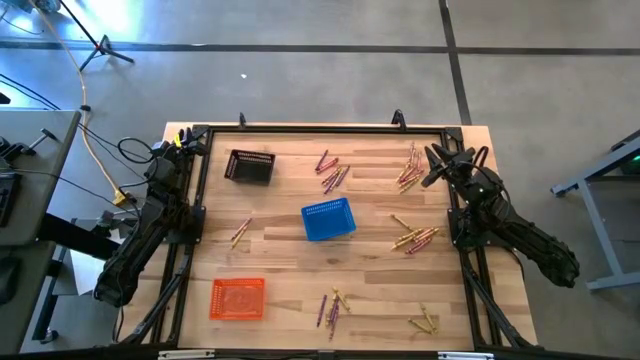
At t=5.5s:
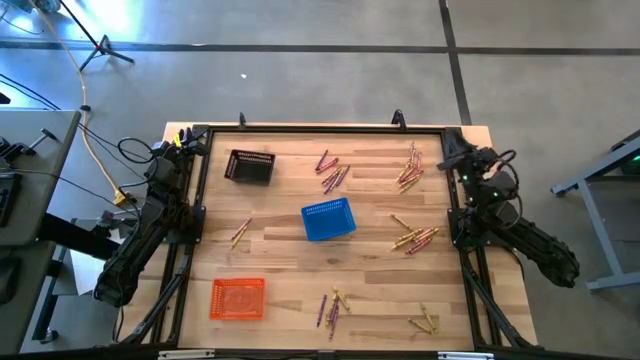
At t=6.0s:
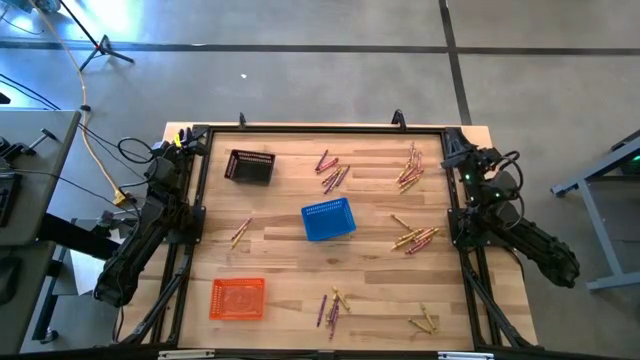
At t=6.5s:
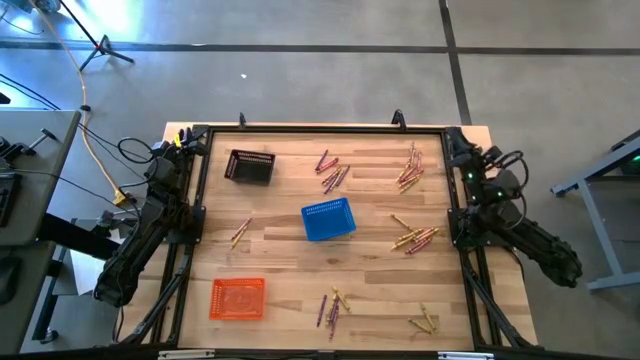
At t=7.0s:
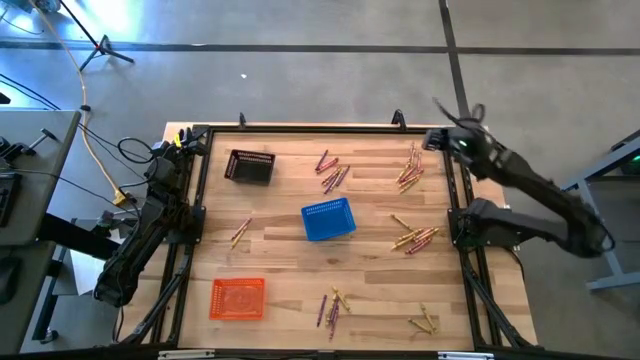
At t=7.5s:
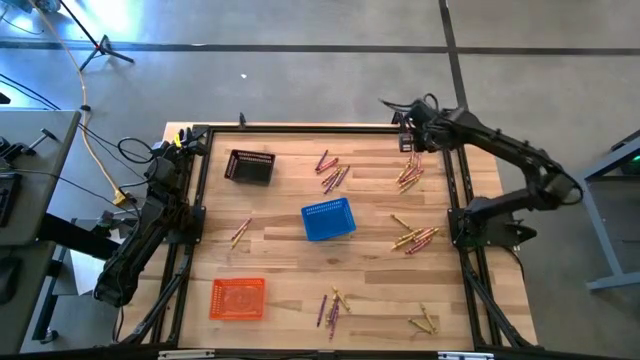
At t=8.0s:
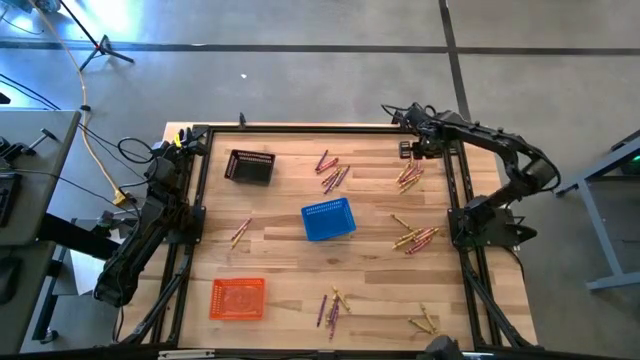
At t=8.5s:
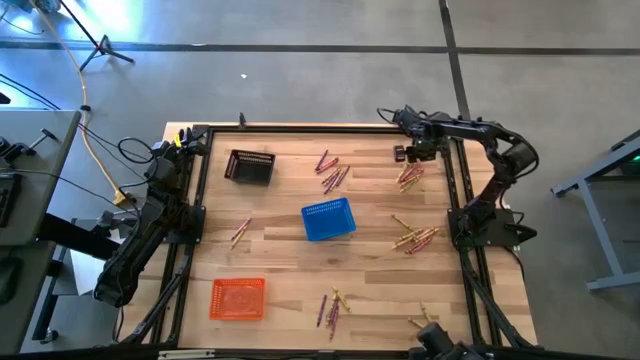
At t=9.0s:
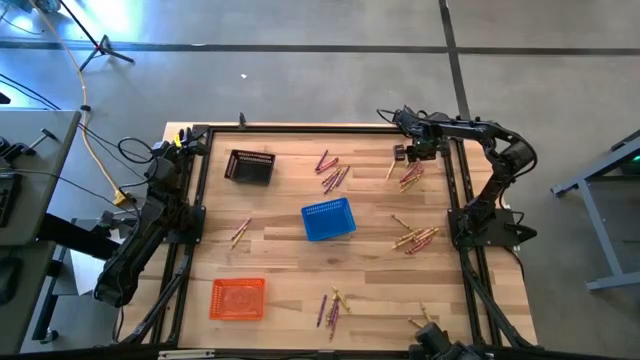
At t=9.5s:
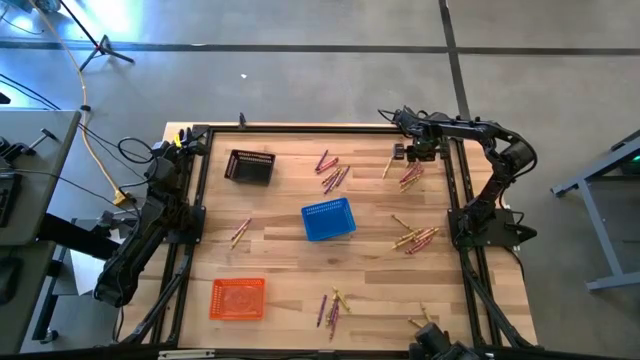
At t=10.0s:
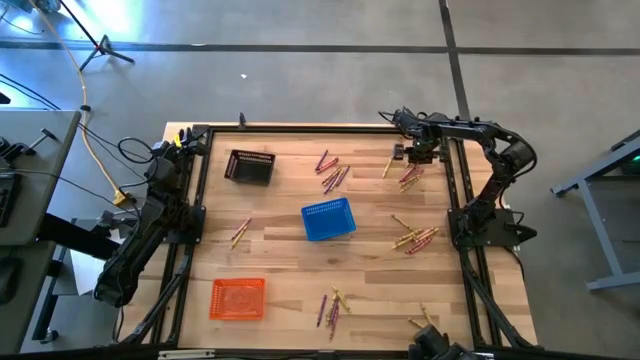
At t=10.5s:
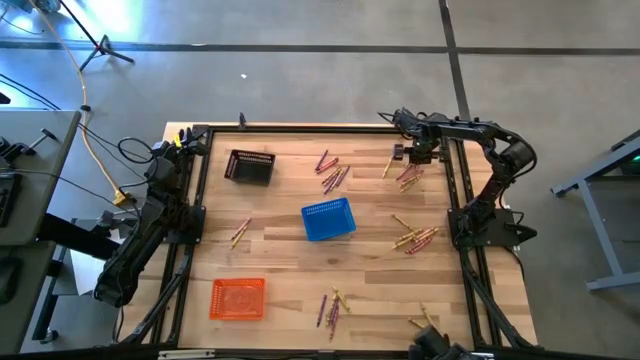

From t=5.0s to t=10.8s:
Task: Sort crayons
Put the red crayon into the black basket

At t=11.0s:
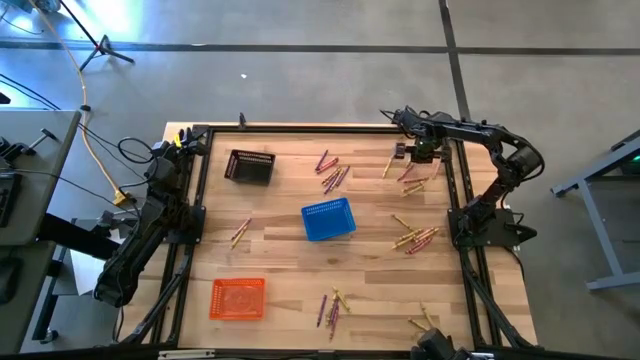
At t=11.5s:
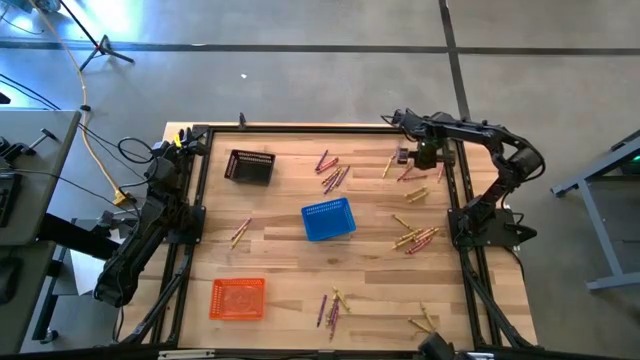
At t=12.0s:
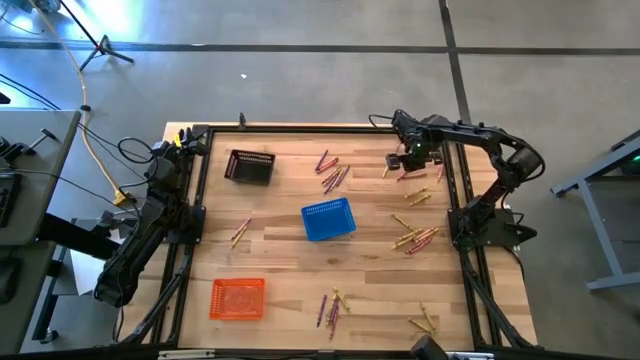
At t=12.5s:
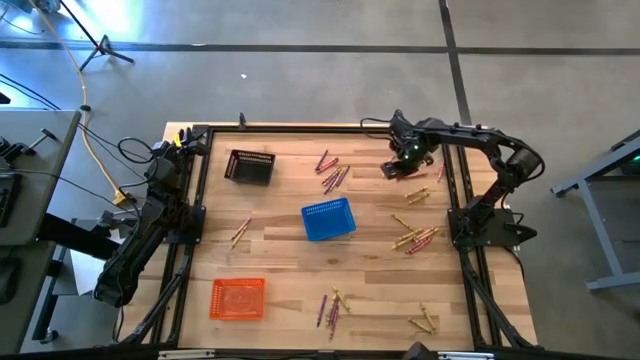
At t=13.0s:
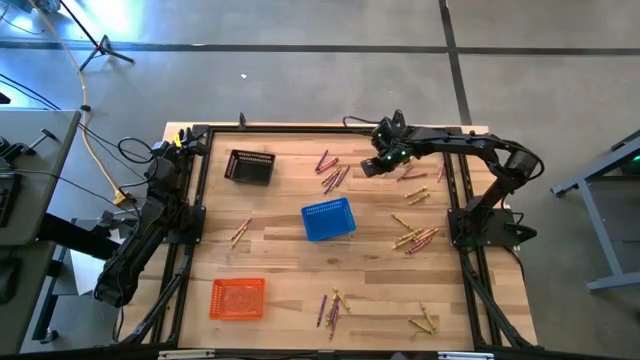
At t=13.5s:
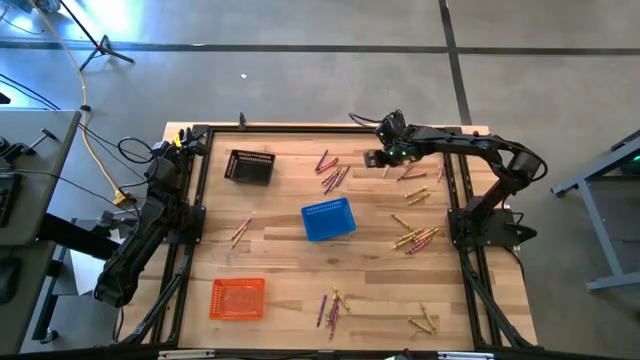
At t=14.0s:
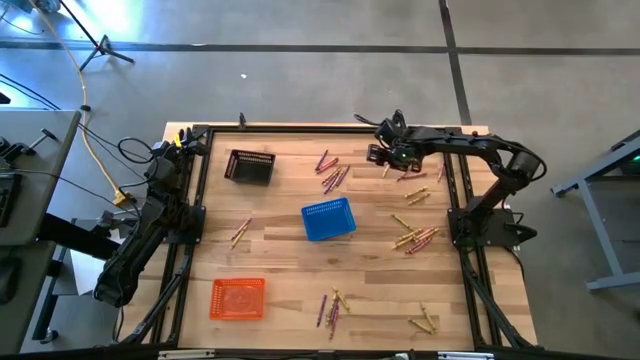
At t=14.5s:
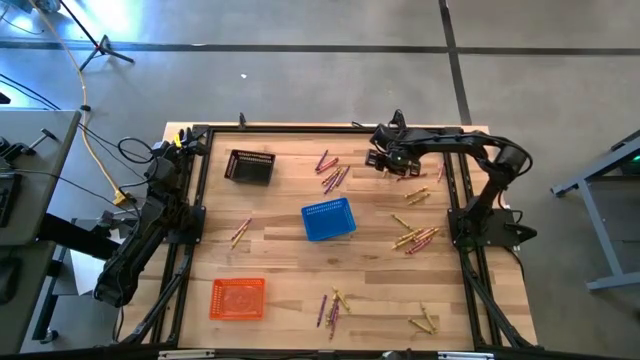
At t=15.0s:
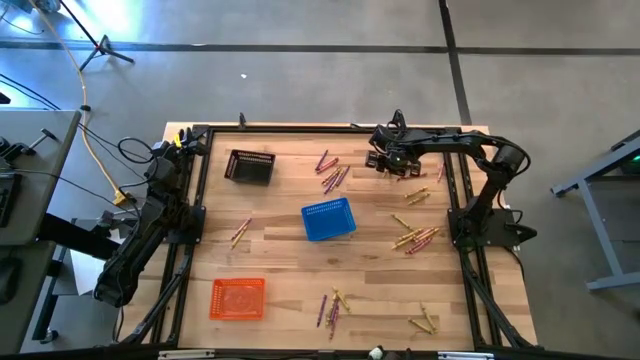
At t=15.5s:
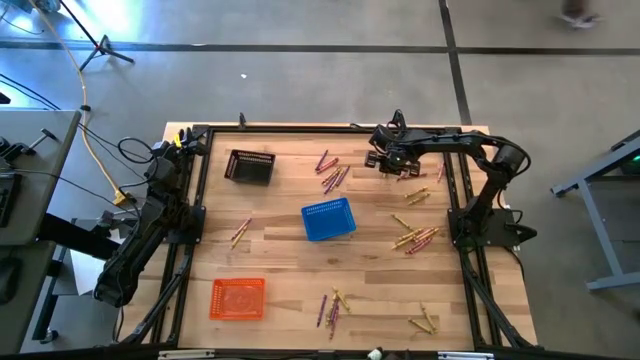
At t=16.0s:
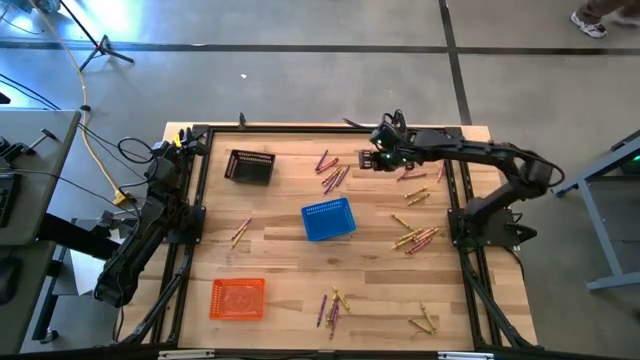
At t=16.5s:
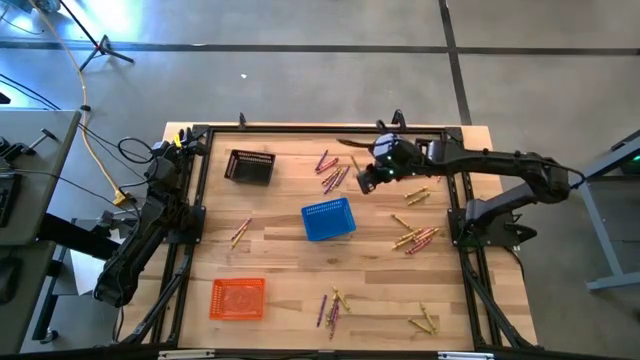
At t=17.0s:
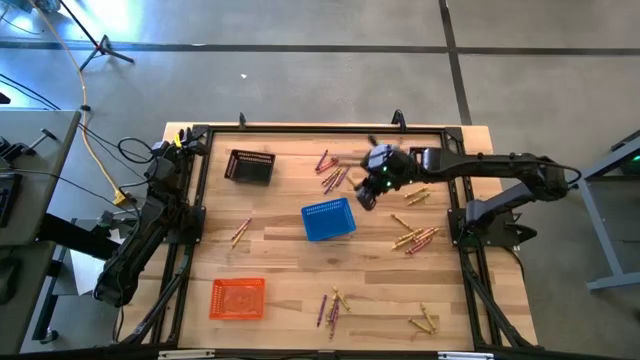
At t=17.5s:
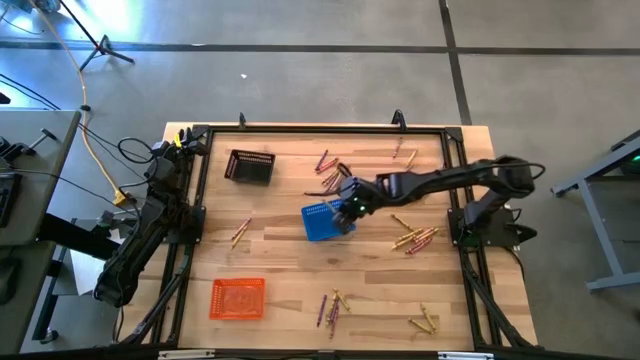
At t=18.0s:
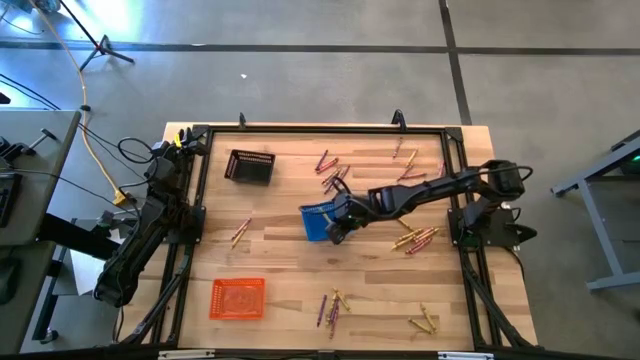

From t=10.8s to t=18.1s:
Put the yellow crayon into the blue basket

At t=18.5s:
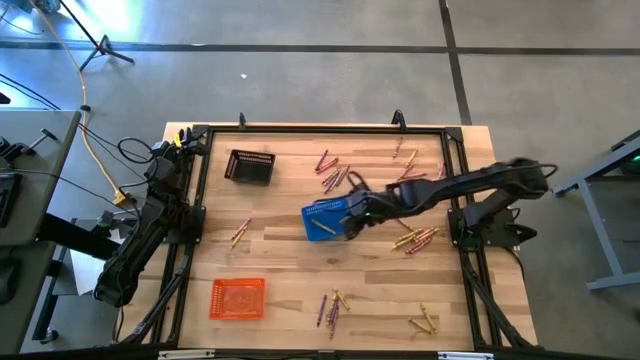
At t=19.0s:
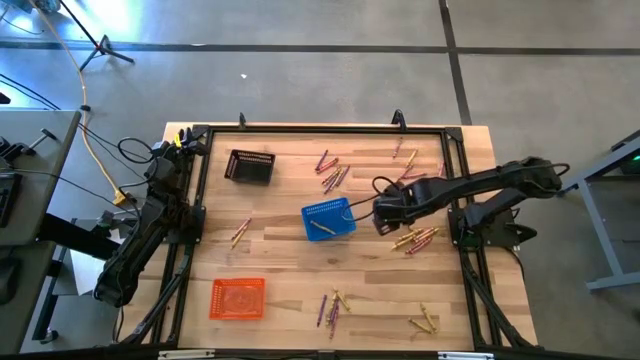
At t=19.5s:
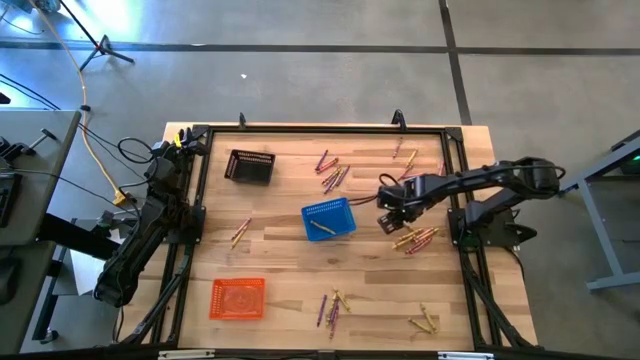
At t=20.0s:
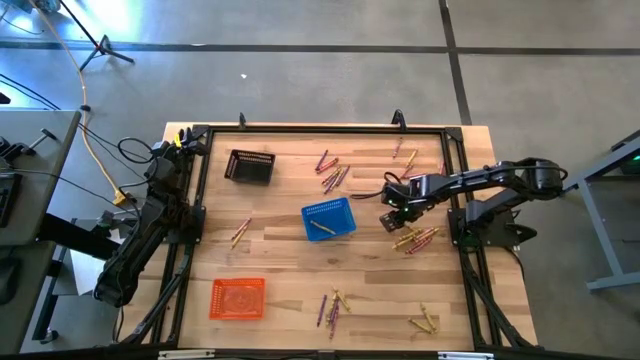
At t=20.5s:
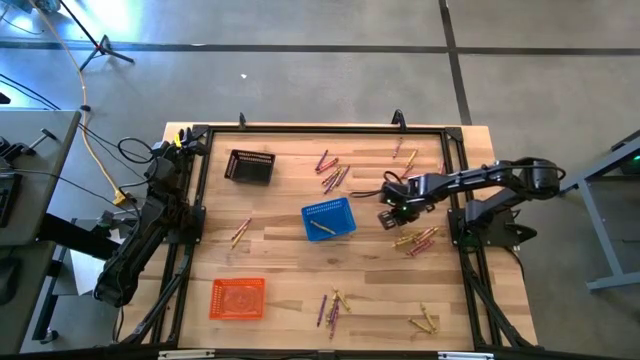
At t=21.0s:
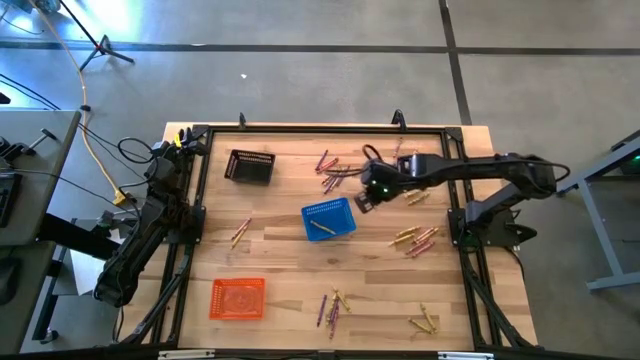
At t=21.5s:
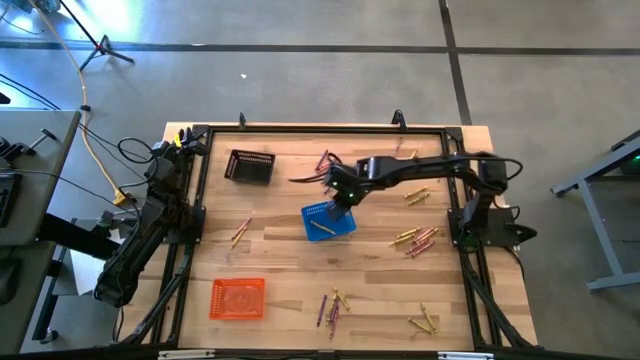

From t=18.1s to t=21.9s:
Put the yellow crayon into the blue basket

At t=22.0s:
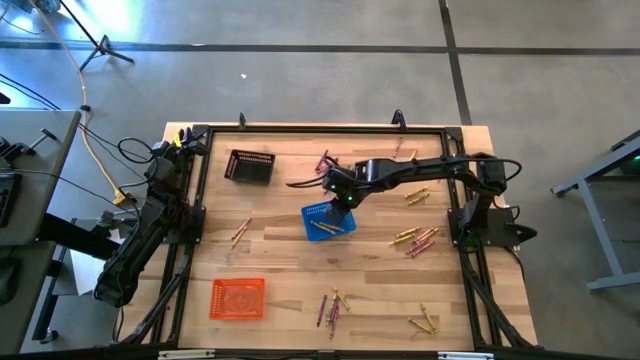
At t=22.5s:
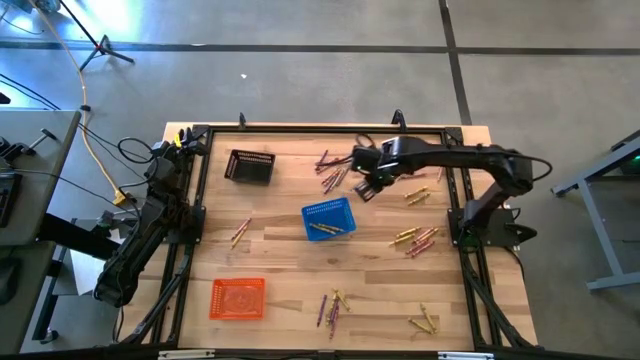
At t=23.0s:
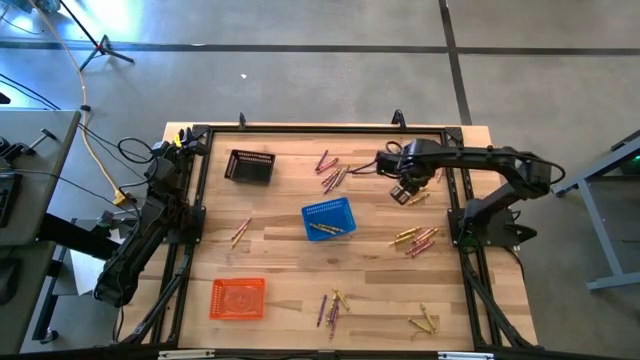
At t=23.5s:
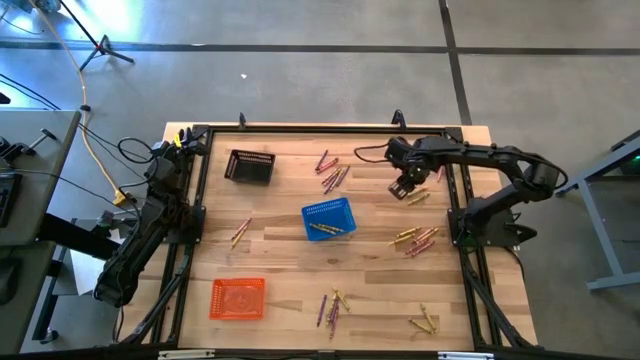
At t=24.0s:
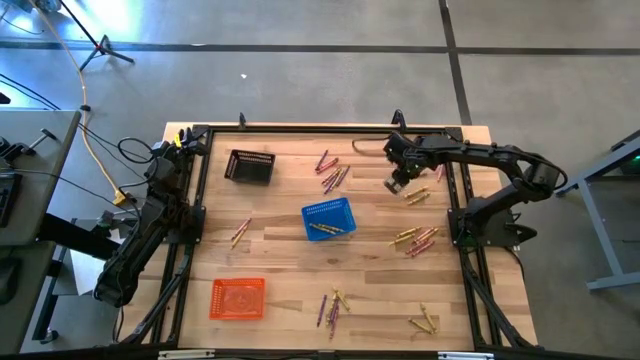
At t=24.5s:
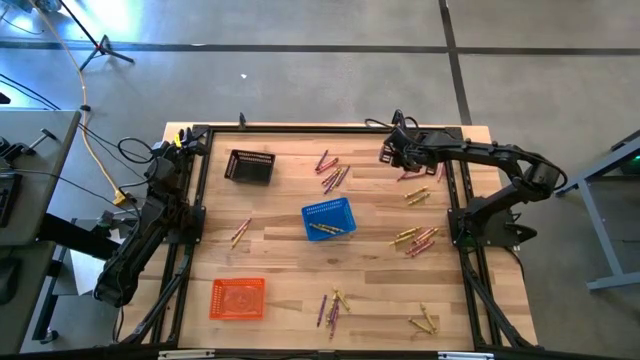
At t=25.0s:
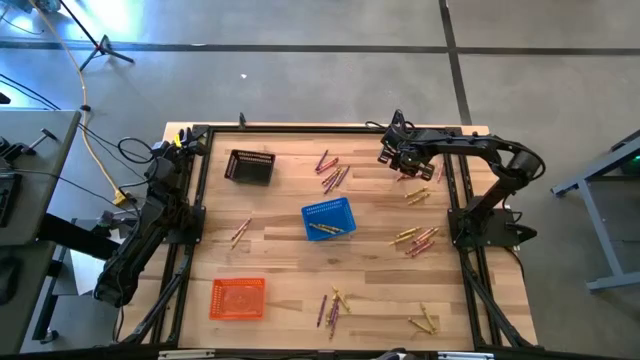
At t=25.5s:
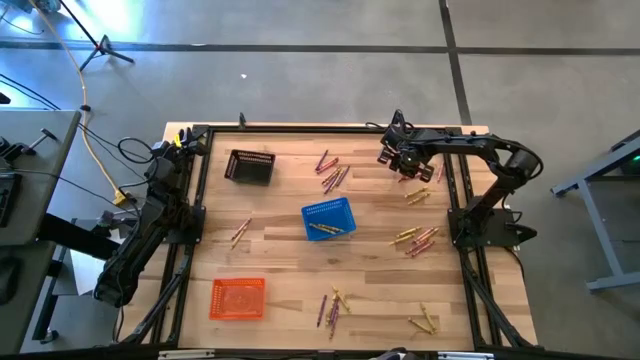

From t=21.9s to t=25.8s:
Put the red crayon into the black basket
